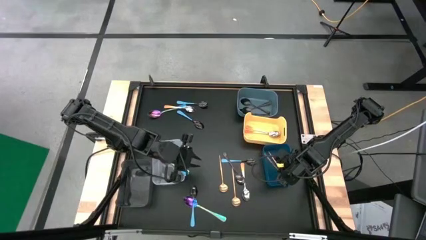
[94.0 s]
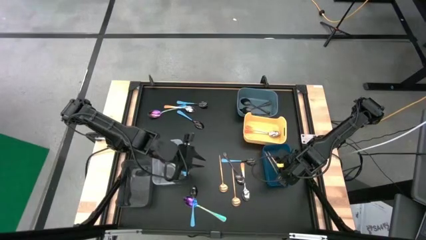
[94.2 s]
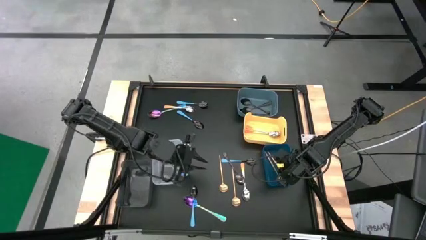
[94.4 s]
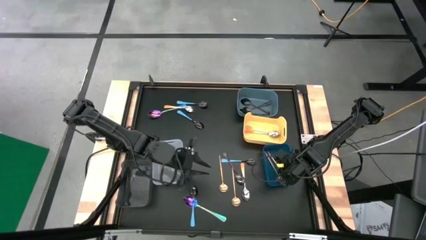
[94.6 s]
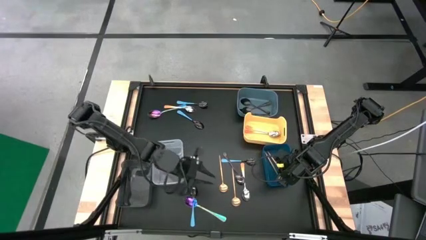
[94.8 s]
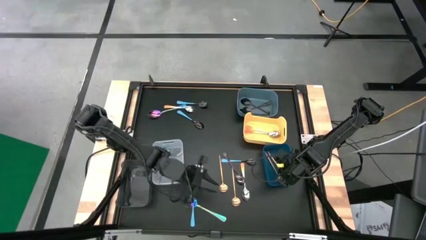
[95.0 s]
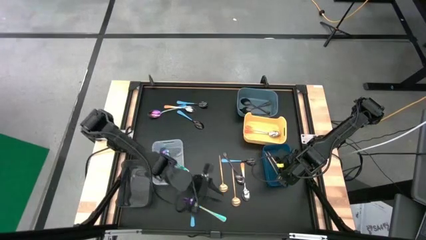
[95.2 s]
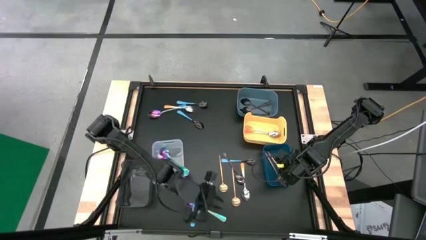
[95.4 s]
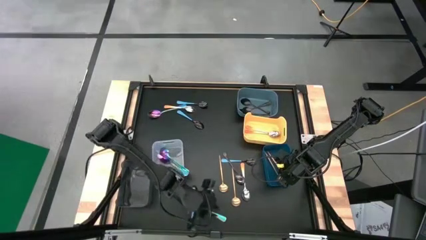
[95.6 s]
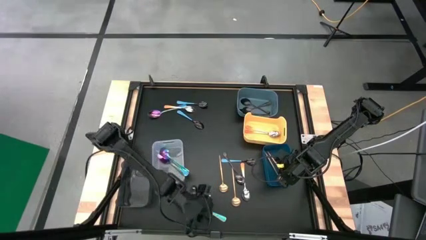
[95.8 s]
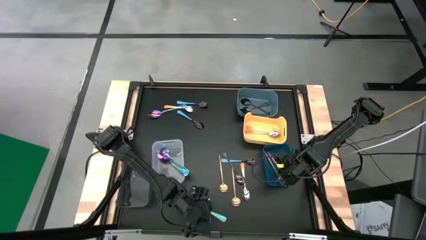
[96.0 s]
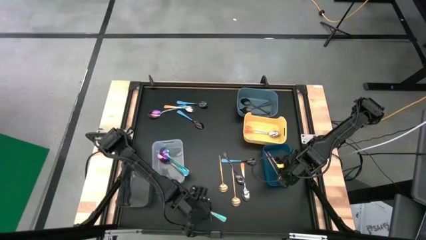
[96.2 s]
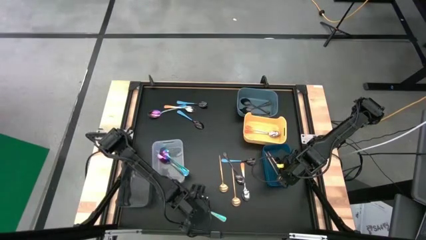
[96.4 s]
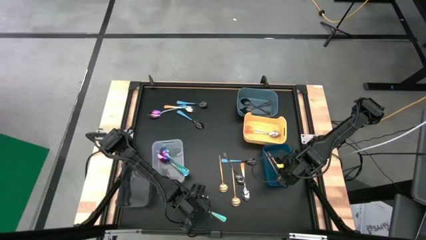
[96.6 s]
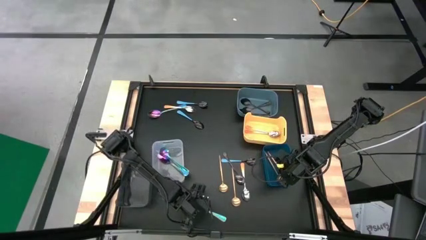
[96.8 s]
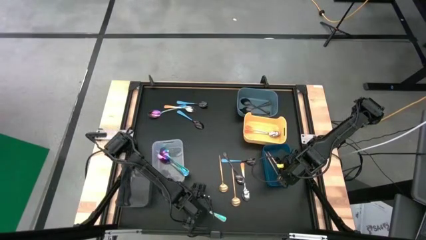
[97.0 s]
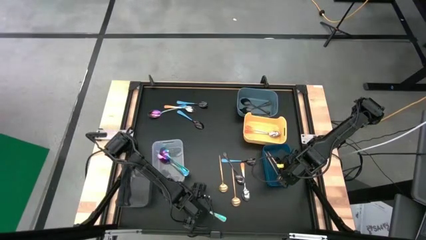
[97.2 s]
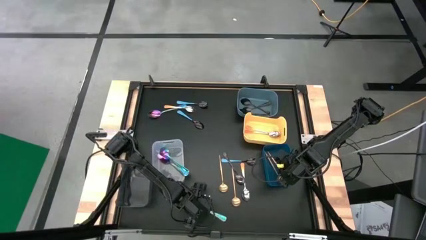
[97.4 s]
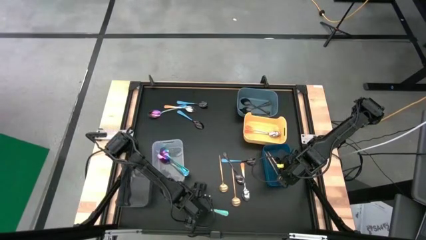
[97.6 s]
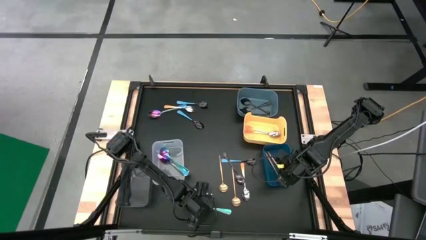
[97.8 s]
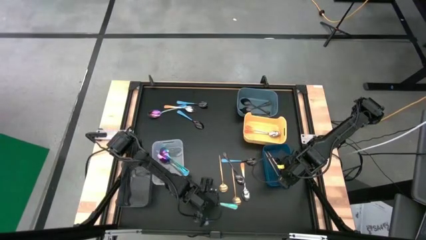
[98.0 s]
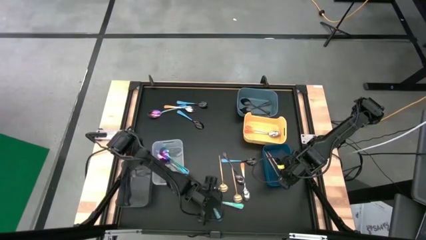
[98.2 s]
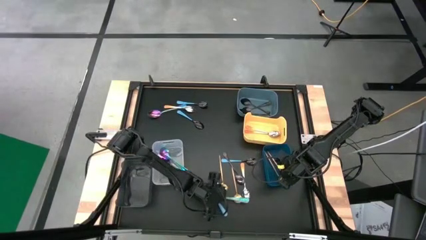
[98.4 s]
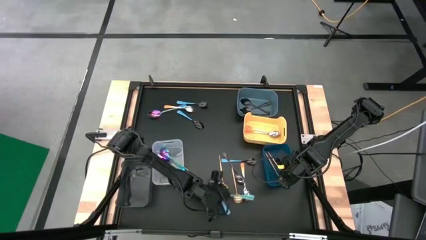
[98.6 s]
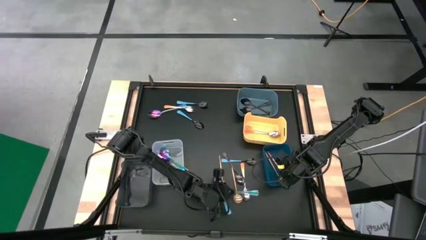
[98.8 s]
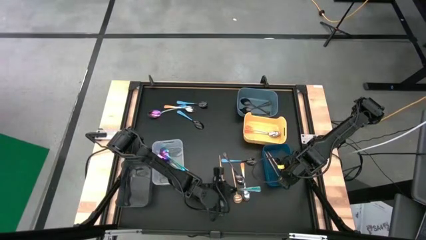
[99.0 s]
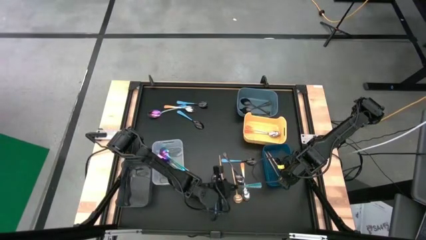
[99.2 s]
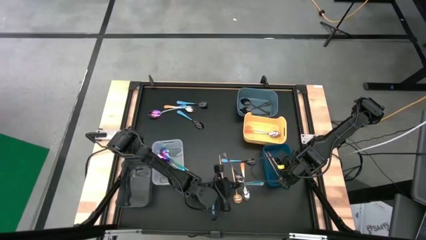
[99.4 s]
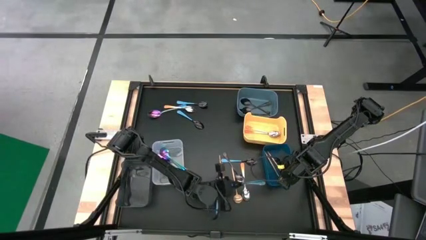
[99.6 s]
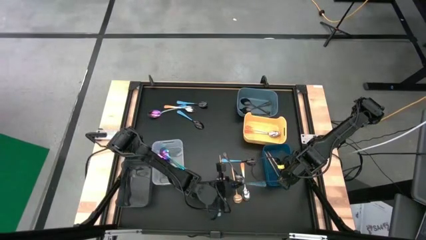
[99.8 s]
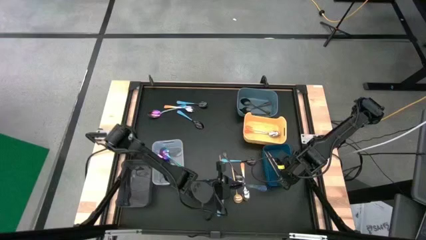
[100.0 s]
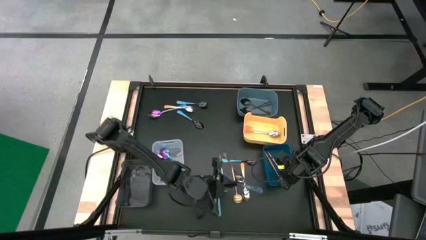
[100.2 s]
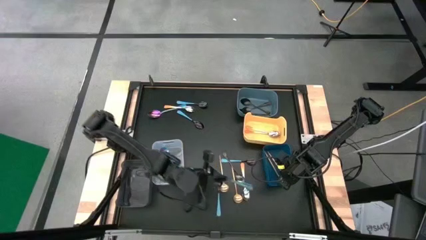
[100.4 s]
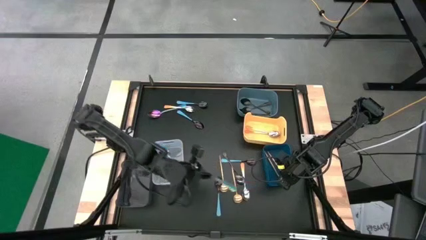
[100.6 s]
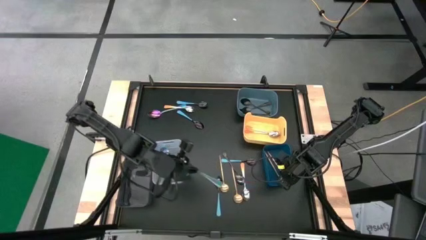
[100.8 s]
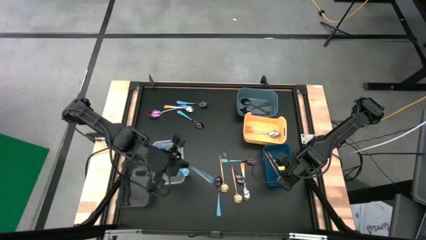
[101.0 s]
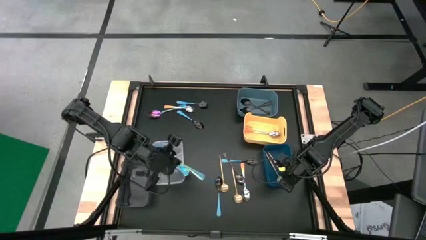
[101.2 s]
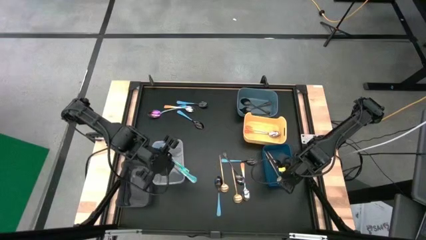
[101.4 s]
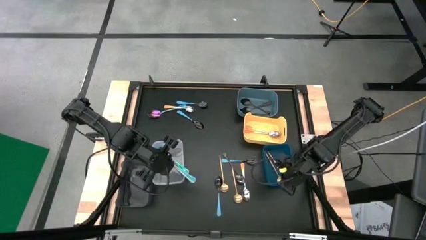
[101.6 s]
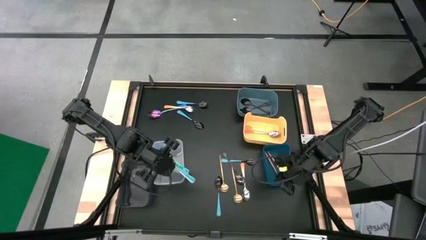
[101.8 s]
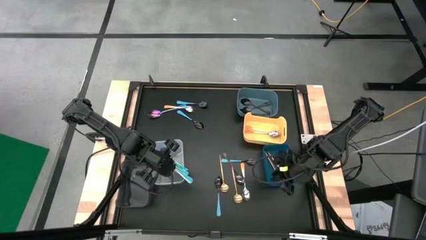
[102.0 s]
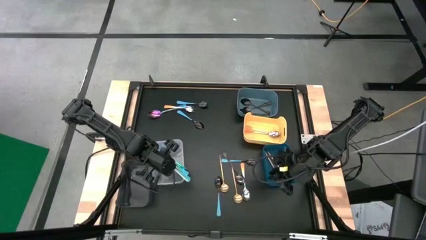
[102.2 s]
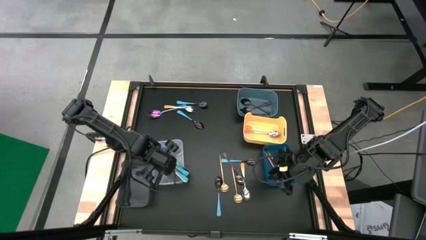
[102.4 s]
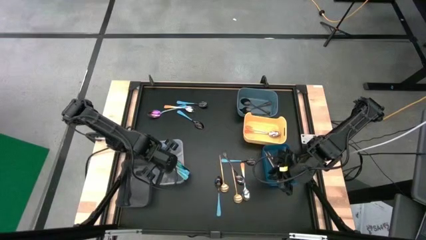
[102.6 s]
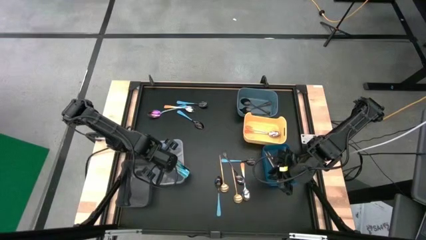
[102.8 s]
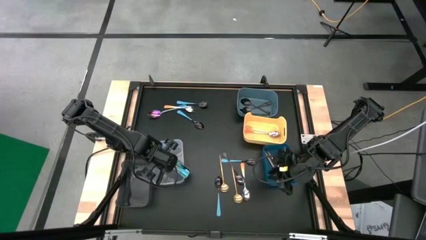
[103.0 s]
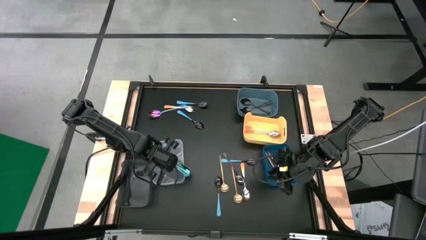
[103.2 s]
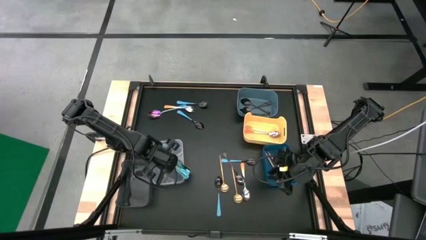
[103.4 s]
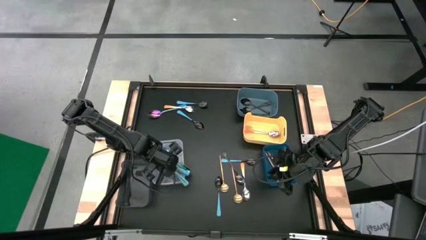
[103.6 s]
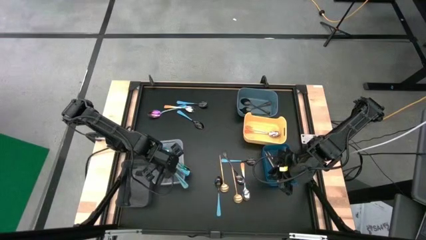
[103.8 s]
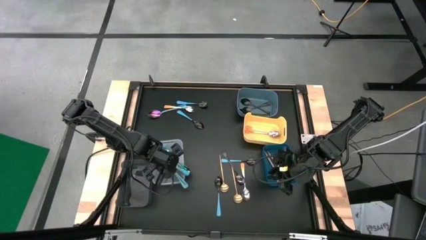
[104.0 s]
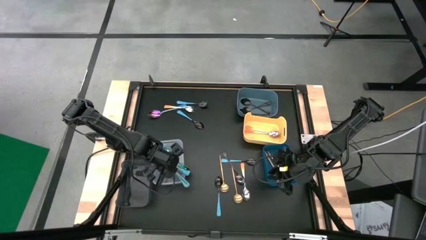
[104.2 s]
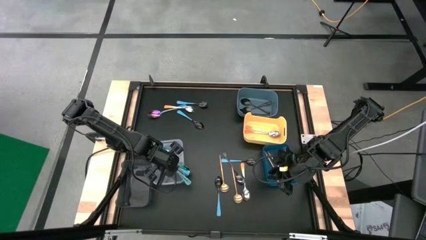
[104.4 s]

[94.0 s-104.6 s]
Task: Sort silverware by color (type)
Put the purple spoon into the transparent bin

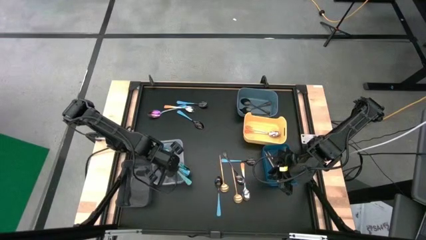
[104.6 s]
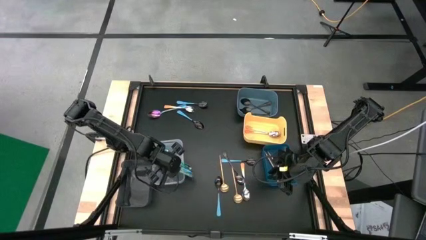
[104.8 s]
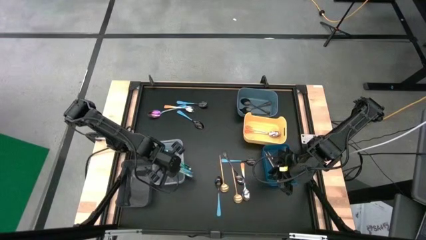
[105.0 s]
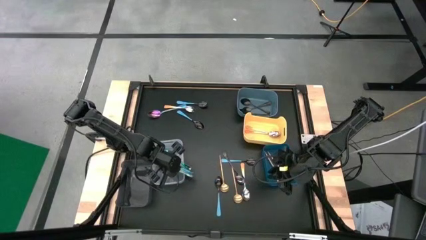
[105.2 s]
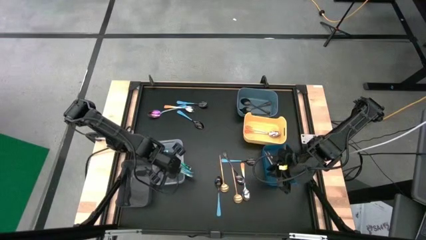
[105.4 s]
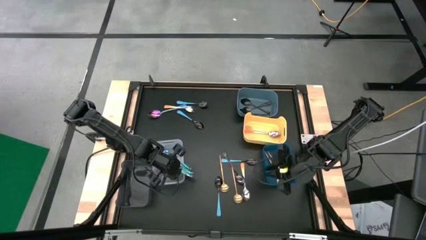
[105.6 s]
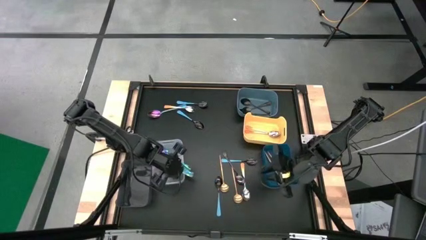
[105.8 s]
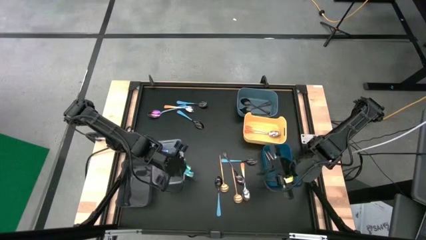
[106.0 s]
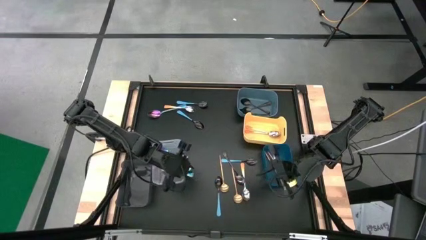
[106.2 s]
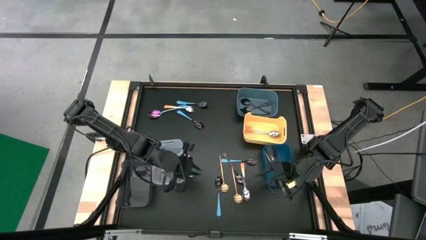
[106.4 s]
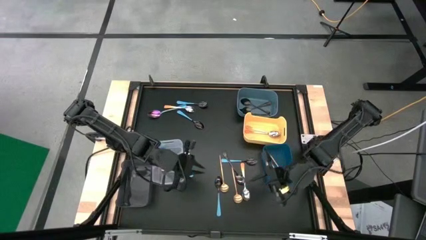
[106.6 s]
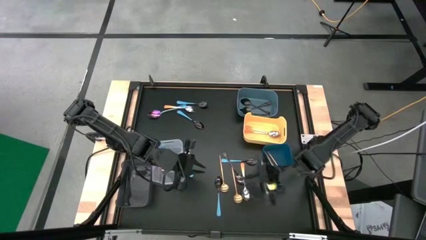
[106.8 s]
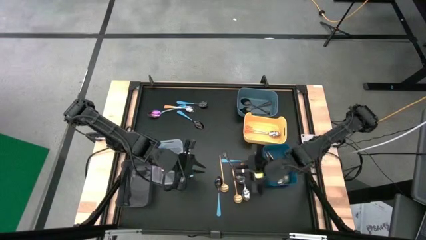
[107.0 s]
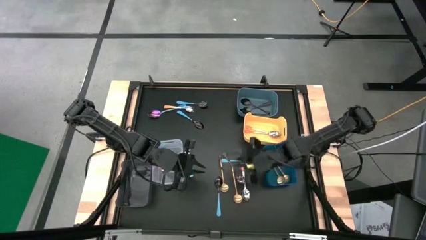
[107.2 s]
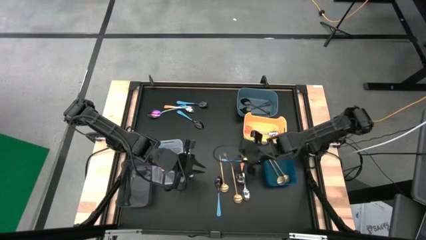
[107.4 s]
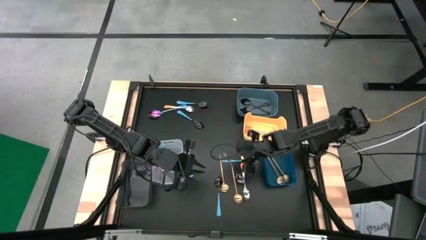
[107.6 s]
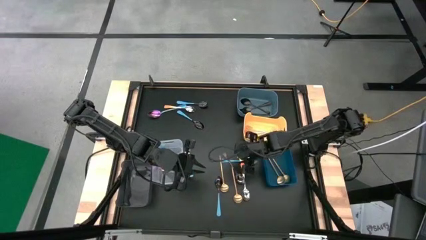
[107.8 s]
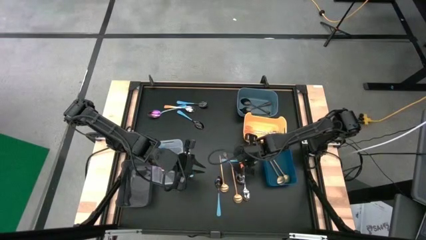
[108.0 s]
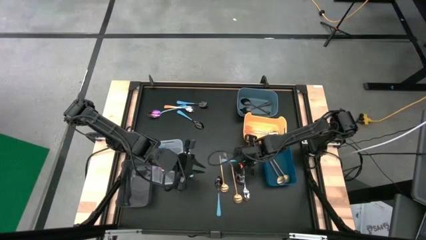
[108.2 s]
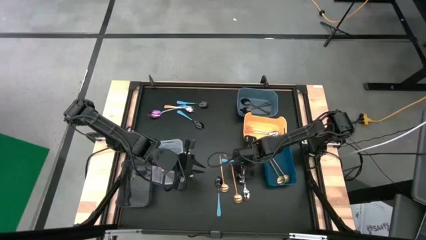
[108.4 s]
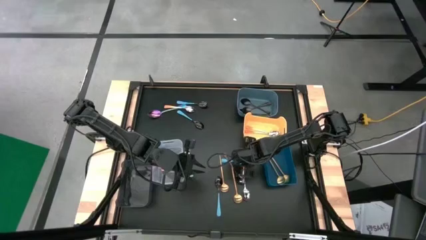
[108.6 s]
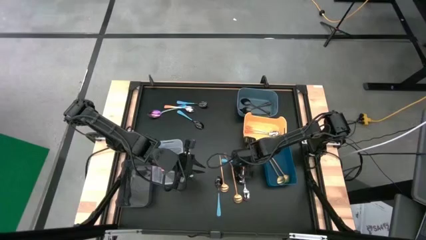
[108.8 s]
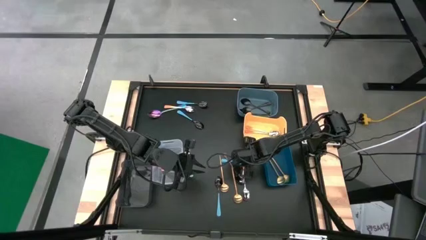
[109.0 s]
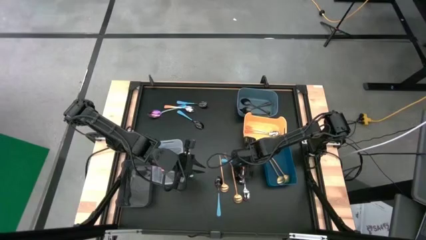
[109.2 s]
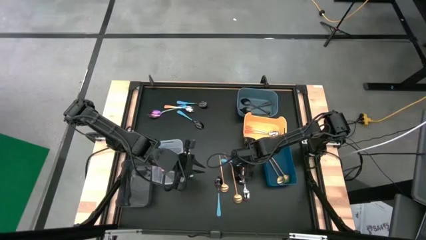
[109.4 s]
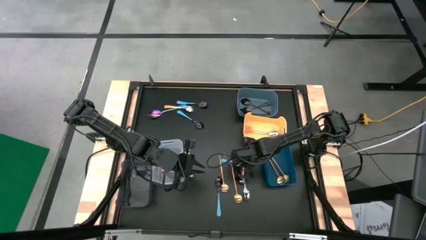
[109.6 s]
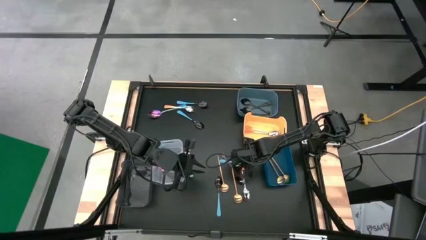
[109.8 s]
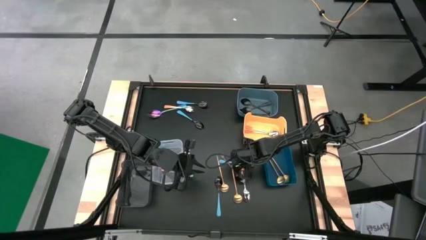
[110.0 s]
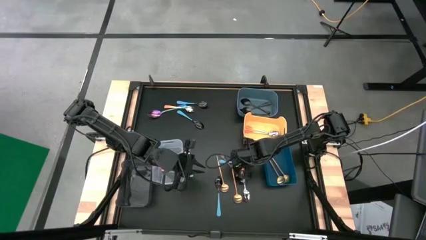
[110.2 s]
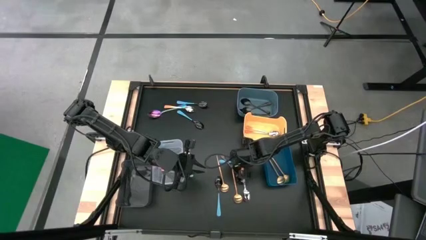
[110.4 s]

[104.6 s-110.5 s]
Put the light blue spoon into the black bin
